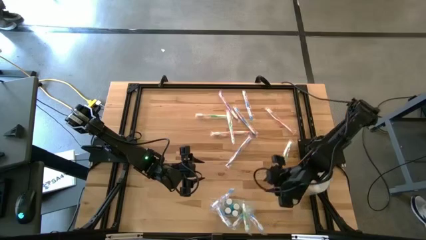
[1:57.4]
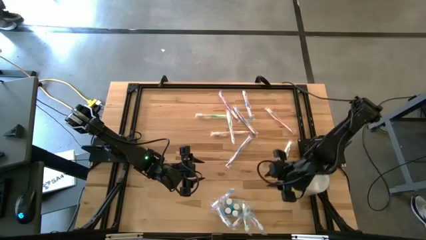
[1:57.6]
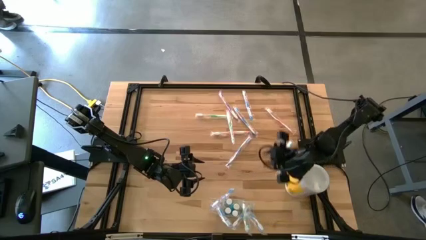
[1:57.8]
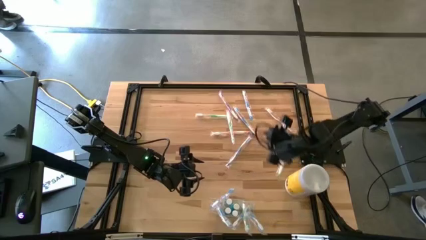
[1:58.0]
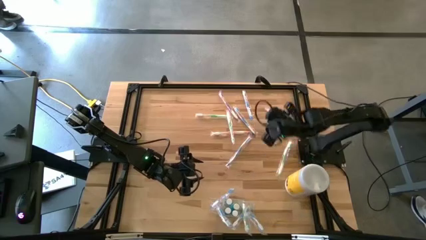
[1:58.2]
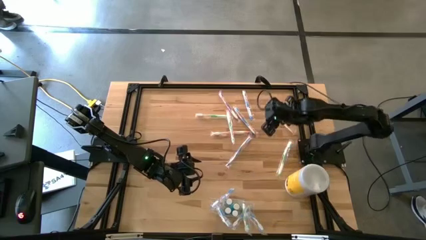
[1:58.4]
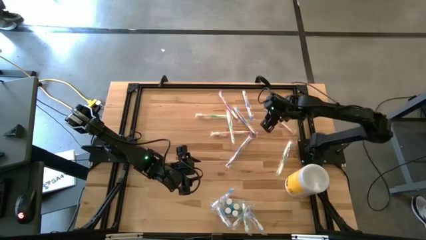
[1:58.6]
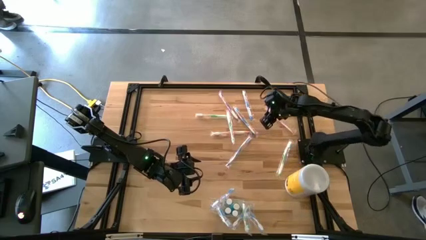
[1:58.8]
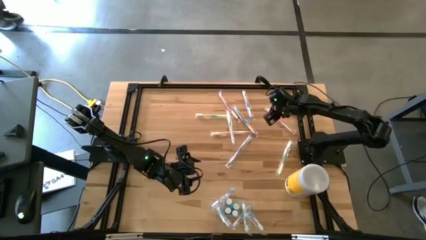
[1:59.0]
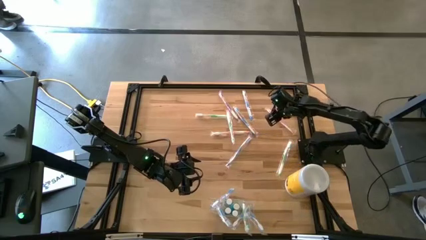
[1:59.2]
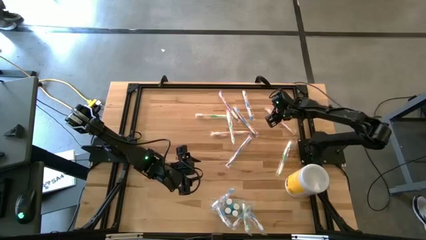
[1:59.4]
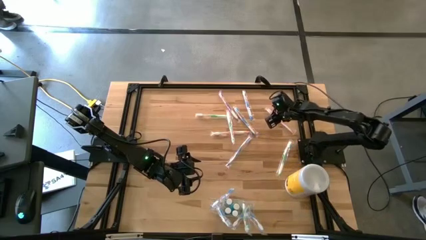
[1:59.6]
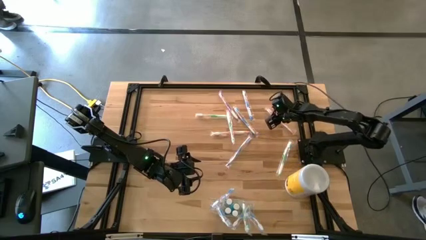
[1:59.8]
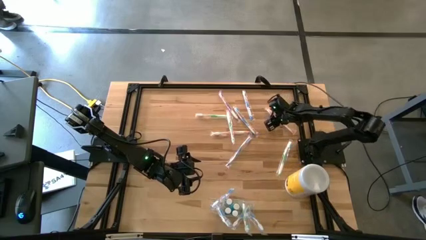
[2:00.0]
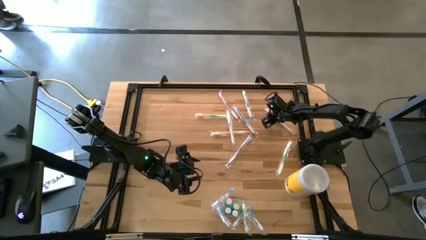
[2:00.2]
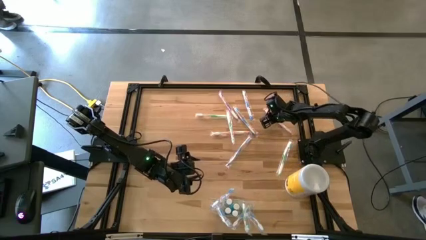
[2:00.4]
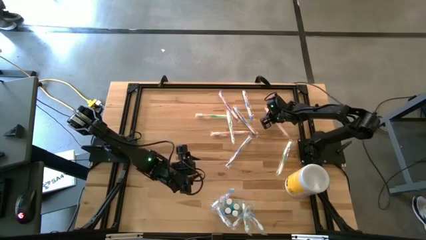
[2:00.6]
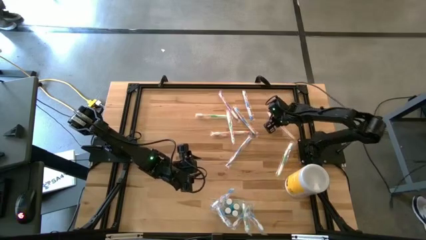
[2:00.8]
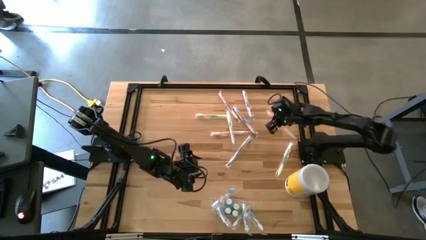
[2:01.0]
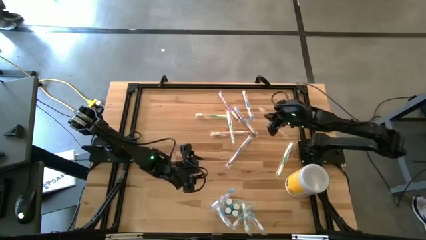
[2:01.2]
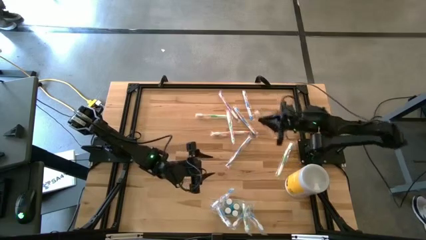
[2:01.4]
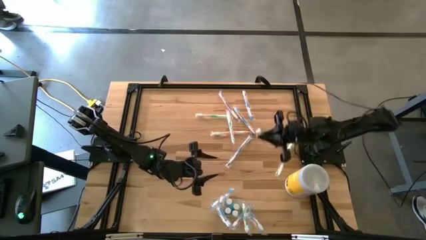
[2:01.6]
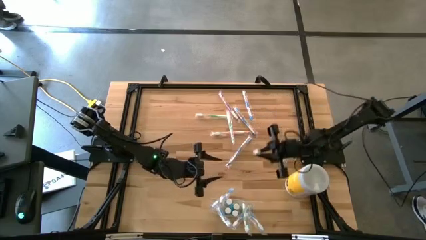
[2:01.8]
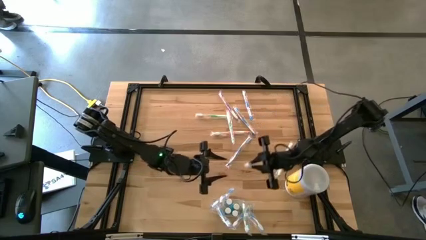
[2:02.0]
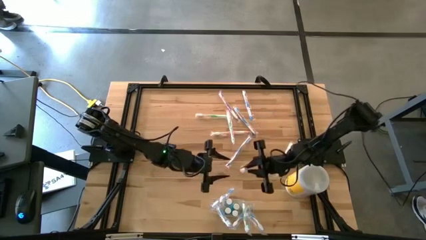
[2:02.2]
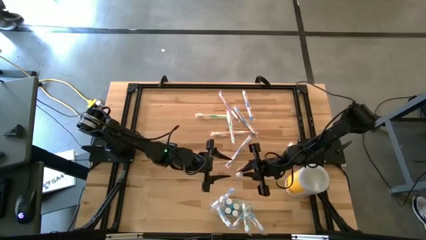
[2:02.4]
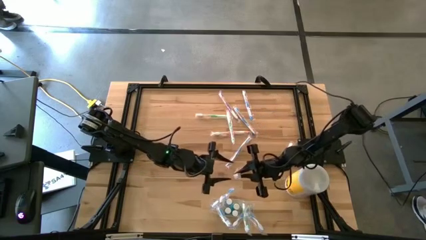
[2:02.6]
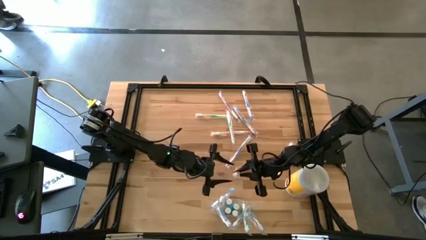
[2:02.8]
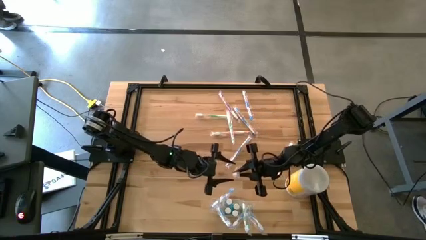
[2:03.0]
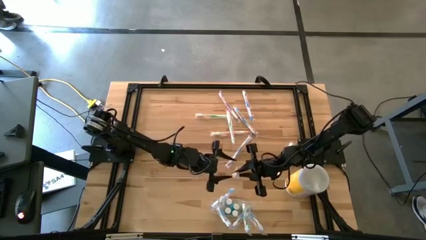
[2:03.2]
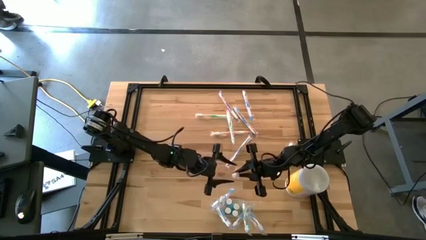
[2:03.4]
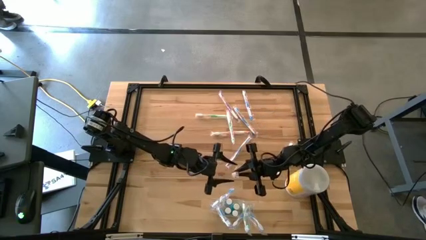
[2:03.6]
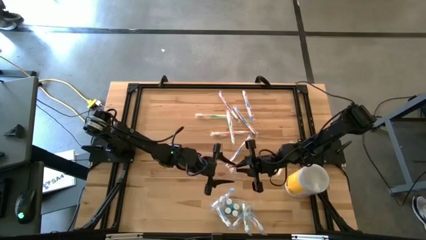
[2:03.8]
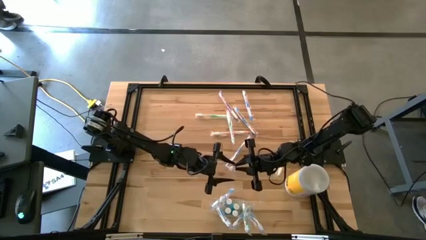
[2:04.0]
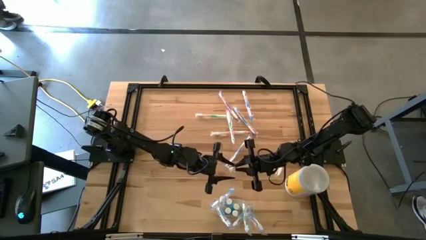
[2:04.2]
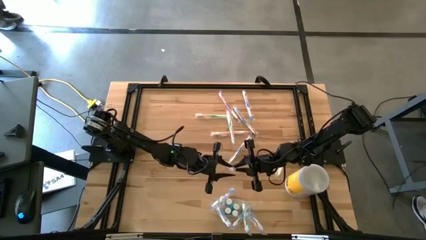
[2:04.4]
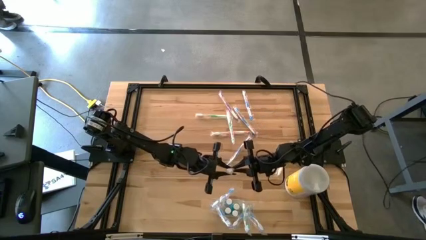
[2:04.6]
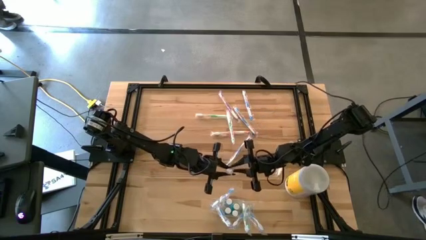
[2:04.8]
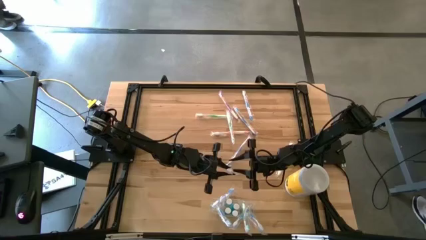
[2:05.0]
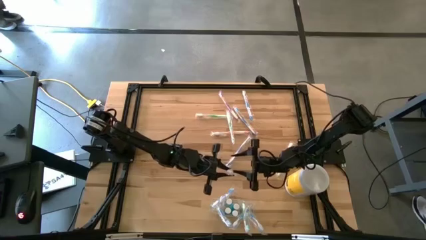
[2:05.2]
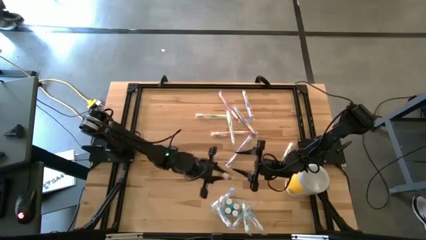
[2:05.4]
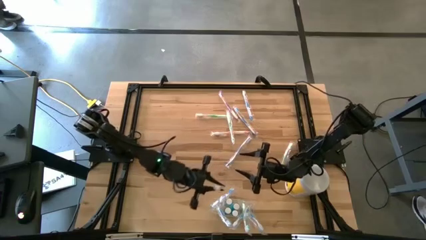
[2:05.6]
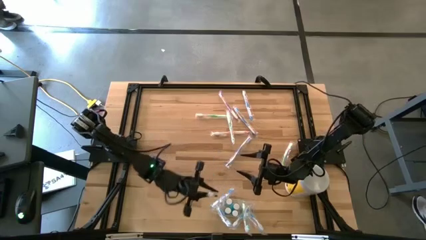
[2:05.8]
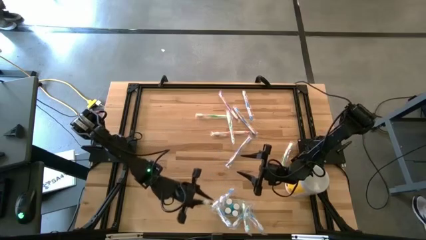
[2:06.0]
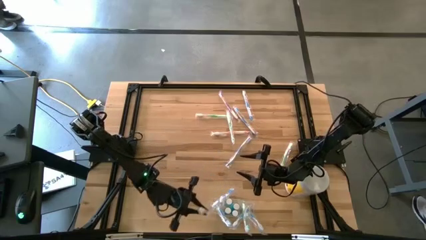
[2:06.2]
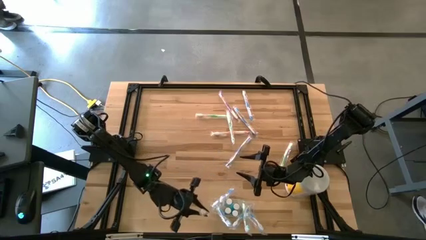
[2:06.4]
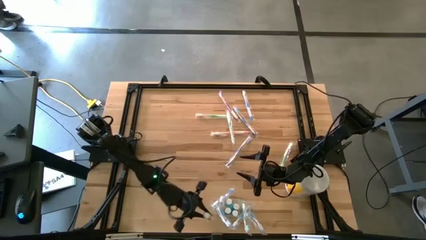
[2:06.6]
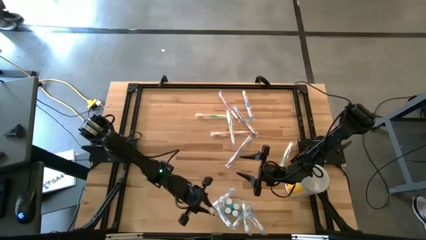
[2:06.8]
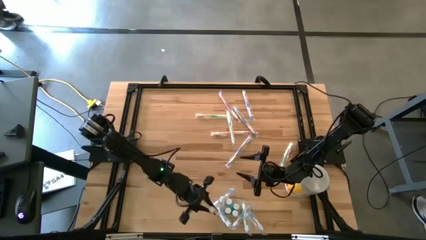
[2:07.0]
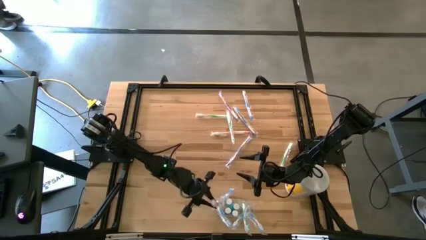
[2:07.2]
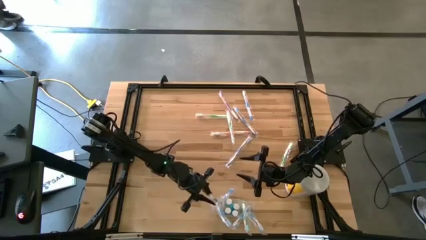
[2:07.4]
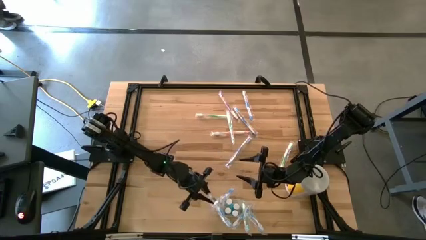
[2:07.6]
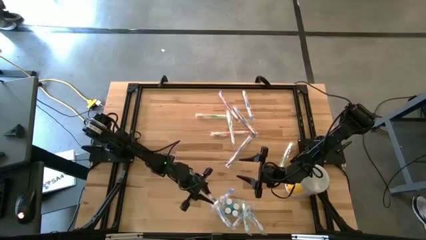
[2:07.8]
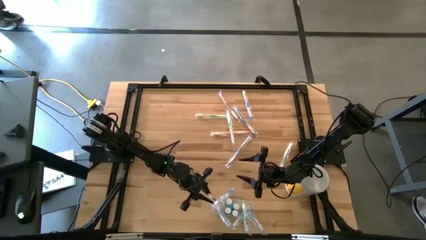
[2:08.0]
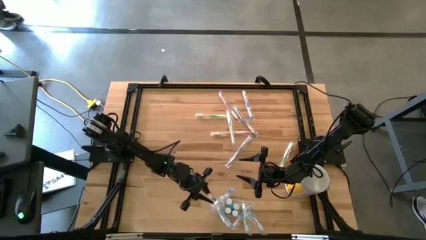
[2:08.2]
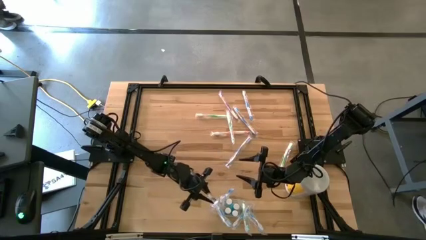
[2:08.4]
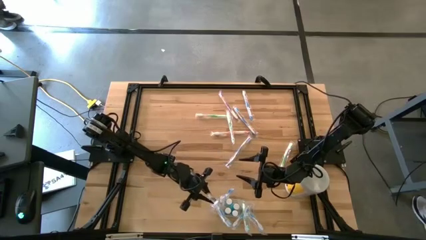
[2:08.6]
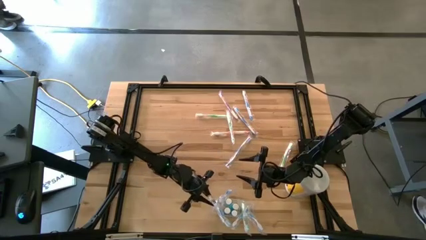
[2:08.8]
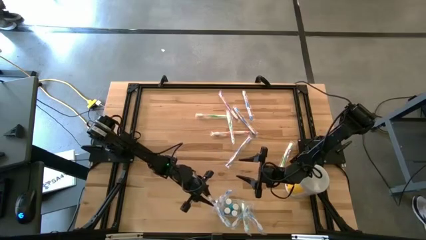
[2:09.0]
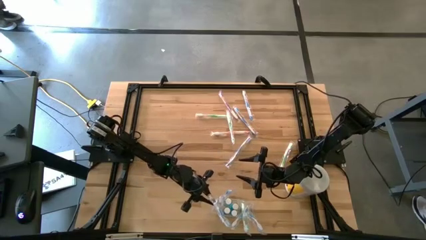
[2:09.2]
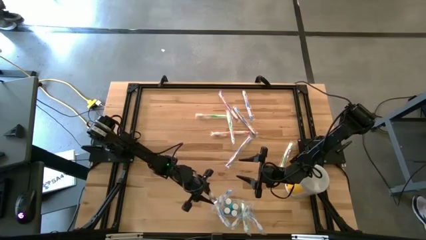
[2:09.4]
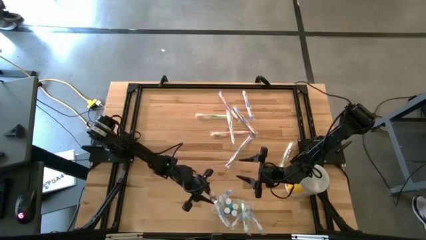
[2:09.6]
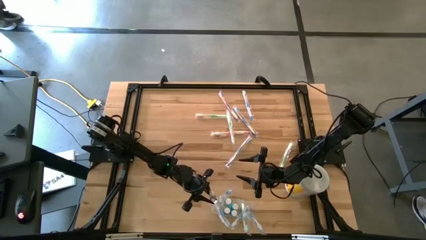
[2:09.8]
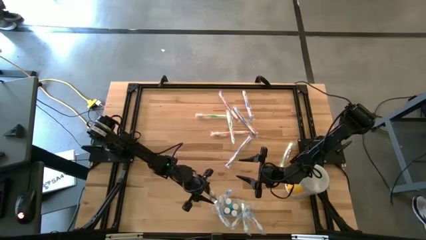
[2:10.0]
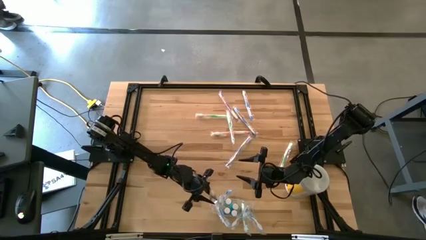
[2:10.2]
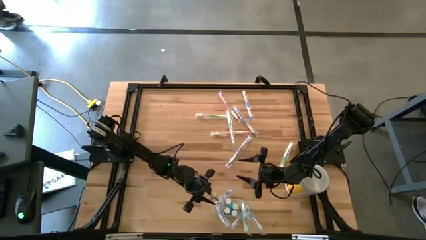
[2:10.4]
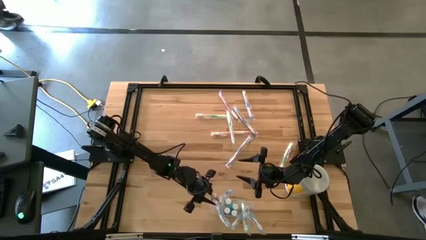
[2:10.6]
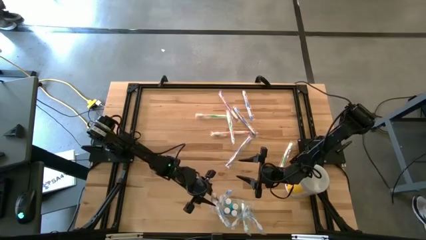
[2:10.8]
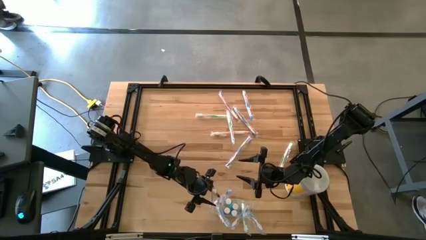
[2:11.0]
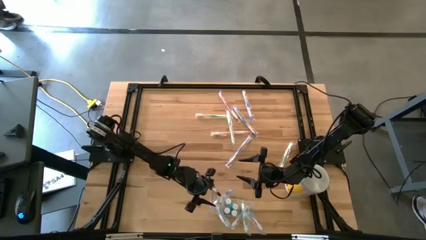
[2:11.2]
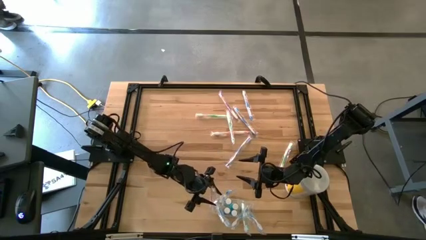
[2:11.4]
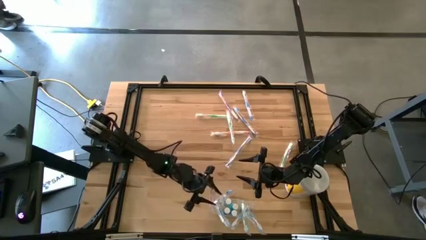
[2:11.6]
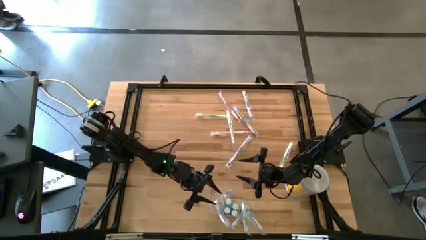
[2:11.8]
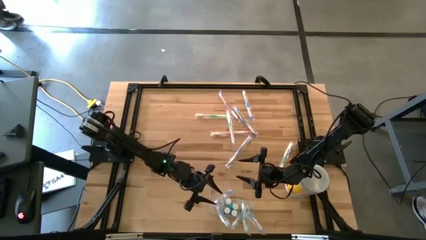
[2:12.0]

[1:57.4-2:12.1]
Task: Pick & Place toothbrushing station
Put the orange toothbrush into the transparent organizer

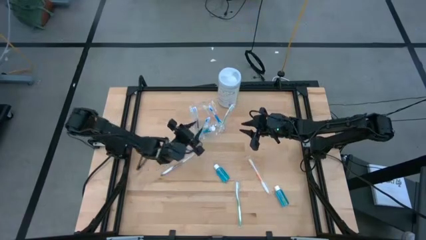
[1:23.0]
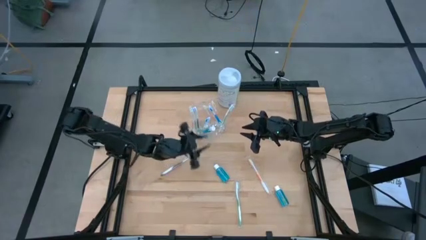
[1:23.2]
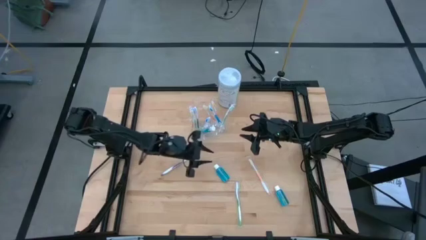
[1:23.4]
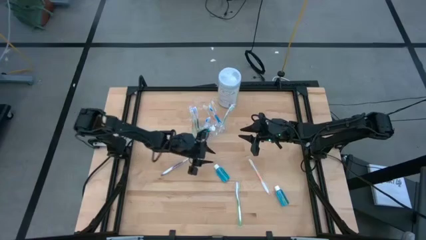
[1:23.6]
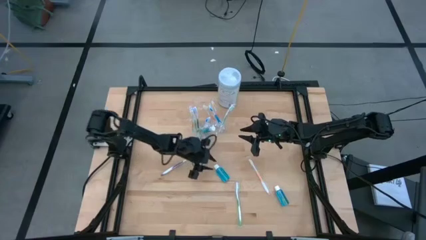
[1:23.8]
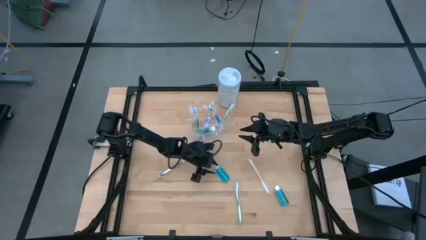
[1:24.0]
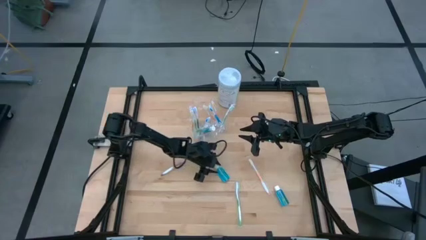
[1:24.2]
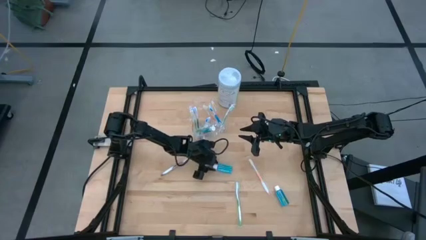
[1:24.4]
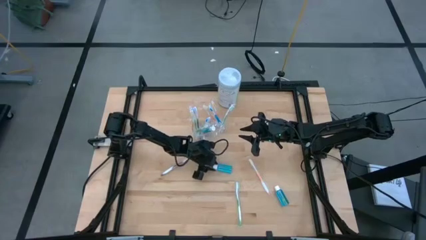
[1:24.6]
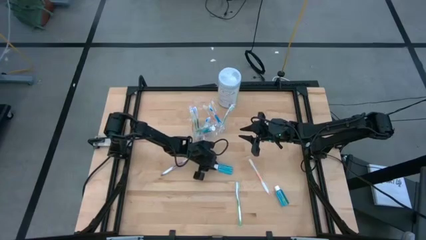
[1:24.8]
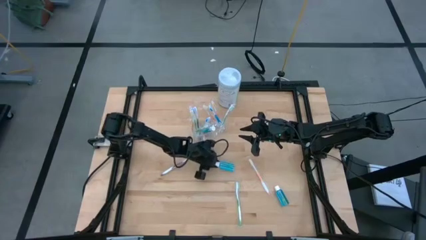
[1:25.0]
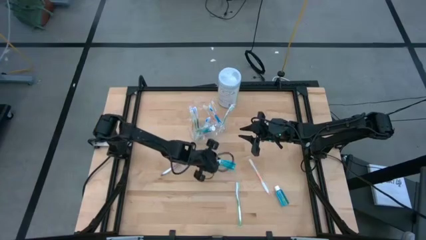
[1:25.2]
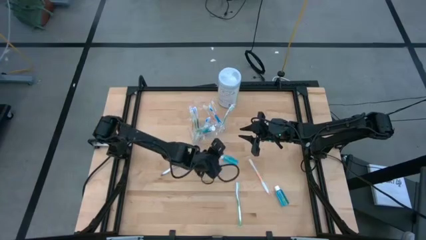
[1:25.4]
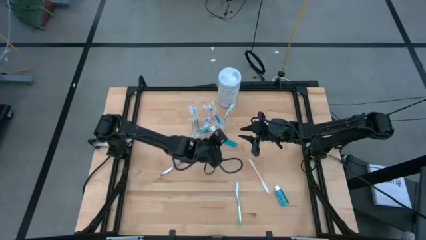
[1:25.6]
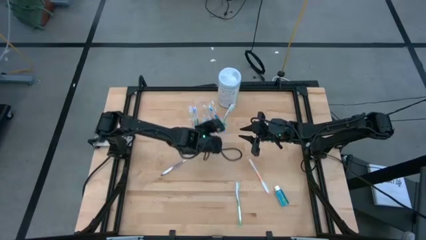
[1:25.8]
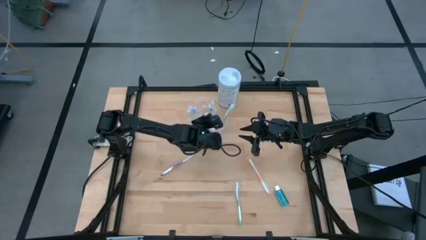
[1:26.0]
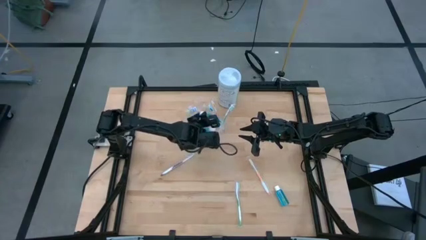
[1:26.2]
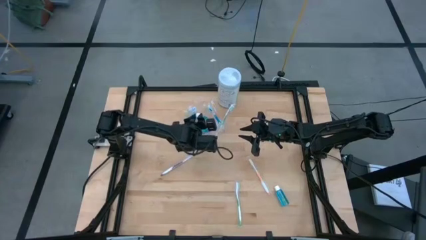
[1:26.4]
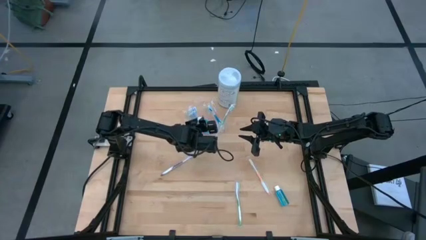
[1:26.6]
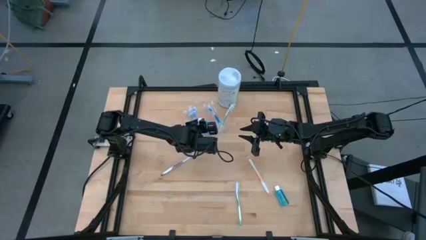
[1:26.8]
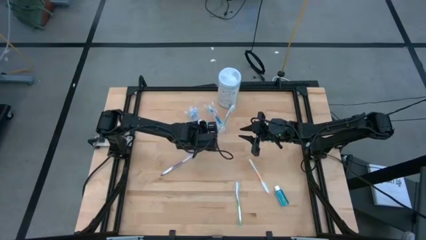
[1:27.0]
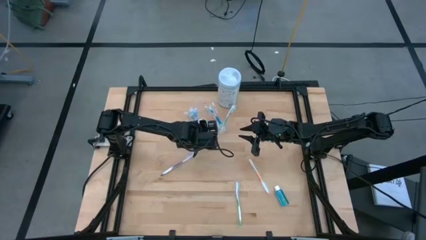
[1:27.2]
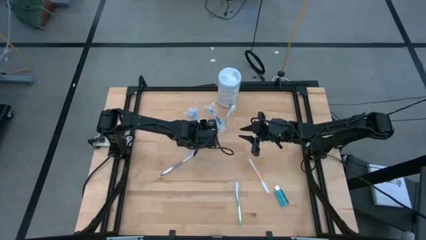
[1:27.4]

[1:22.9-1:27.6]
Task: Pick & Place toothbrushing station
Put the blue mouthwash into the transparent organizer
